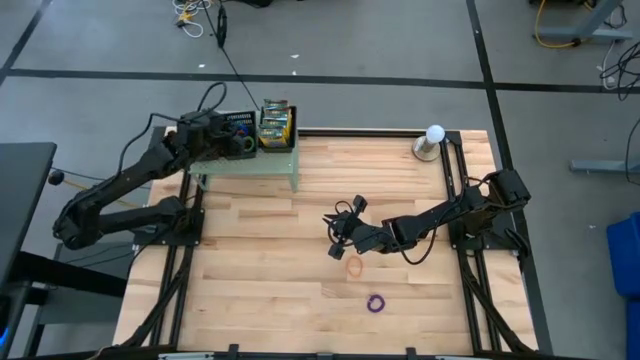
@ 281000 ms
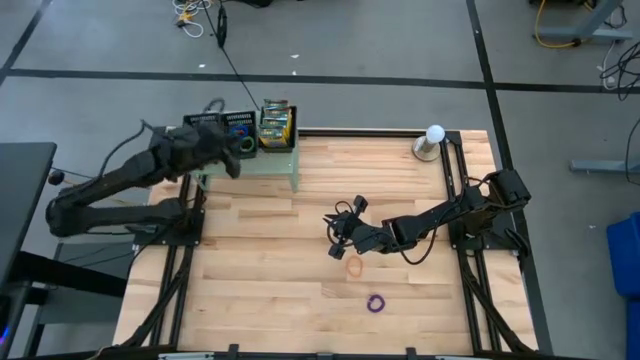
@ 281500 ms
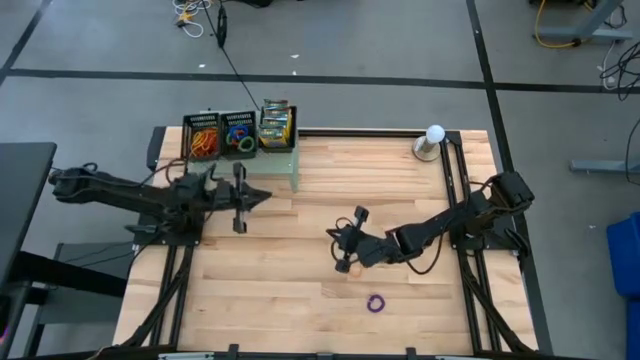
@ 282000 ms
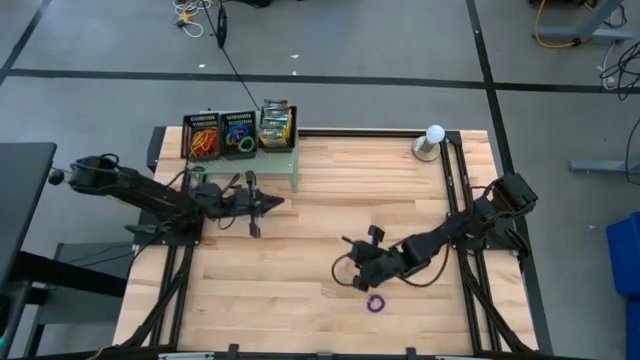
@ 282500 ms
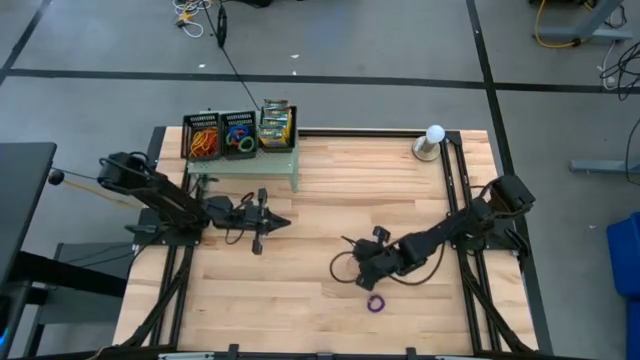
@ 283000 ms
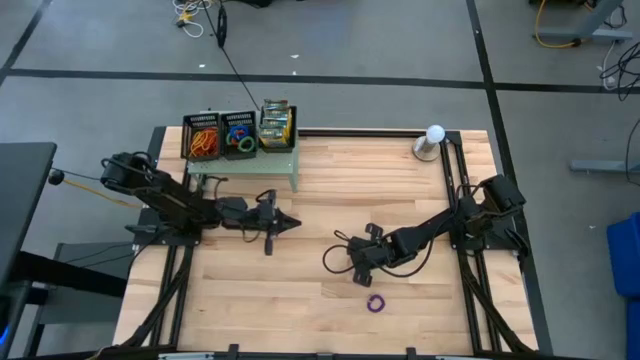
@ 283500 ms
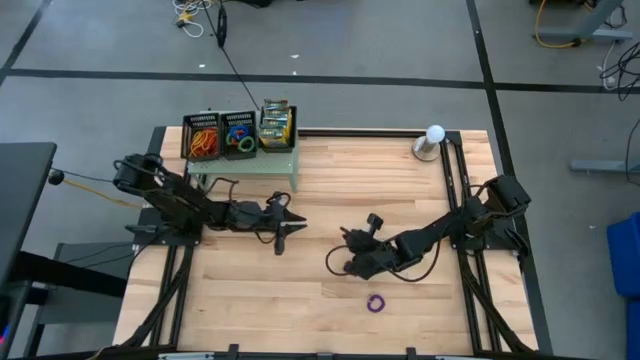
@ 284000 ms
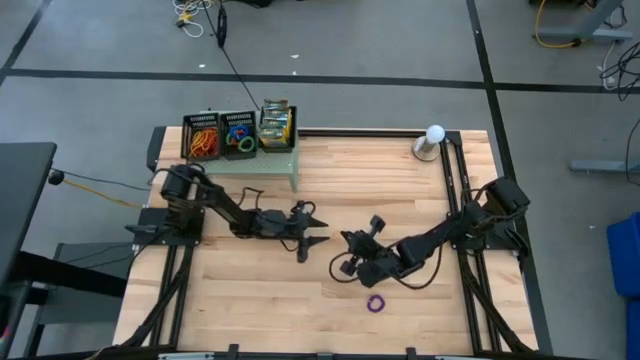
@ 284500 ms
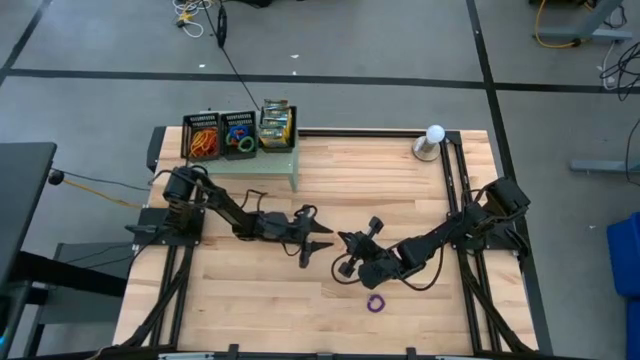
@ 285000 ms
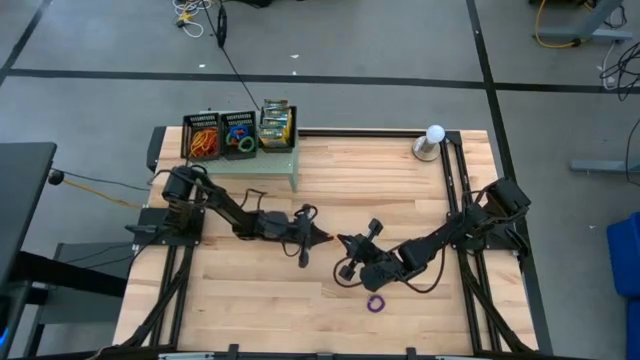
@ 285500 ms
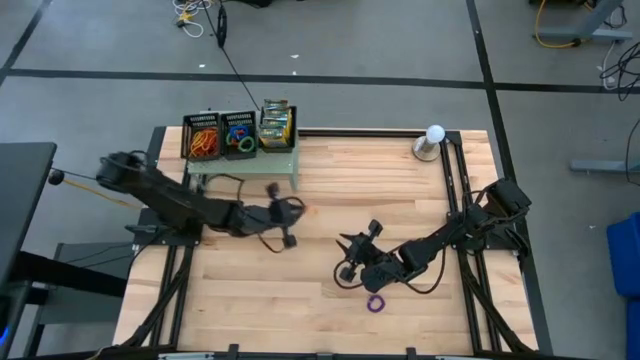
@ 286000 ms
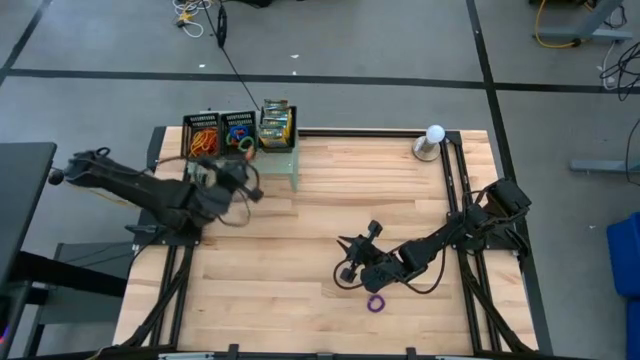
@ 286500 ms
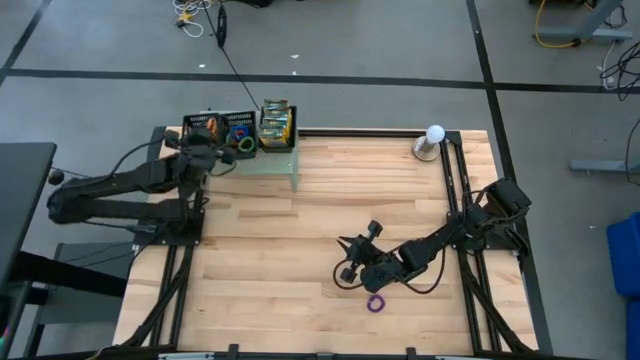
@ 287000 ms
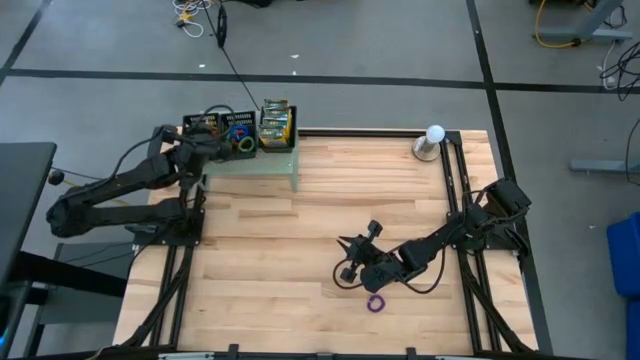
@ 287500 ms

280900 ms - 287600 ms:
Task: Pick & Place Office Desk Supplies
Put the orange rubber band into the left black bin on the shelf

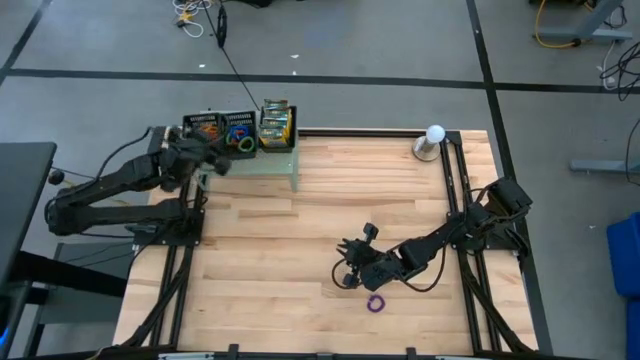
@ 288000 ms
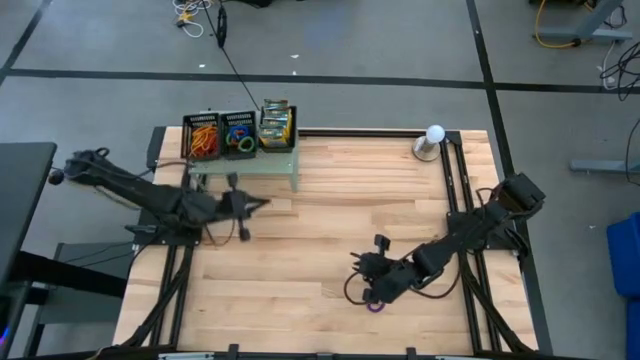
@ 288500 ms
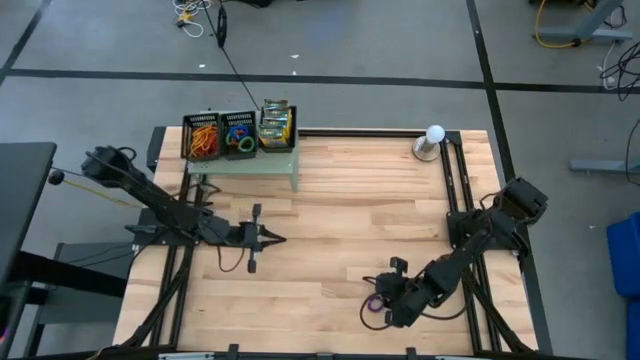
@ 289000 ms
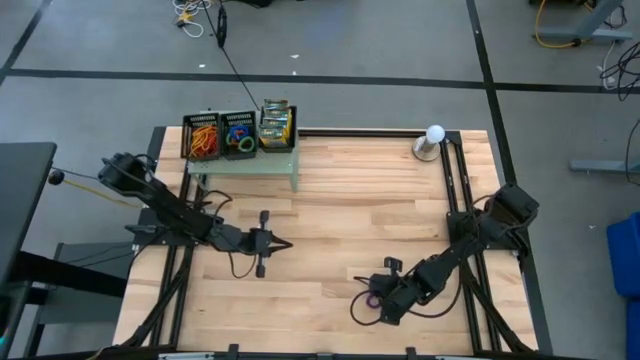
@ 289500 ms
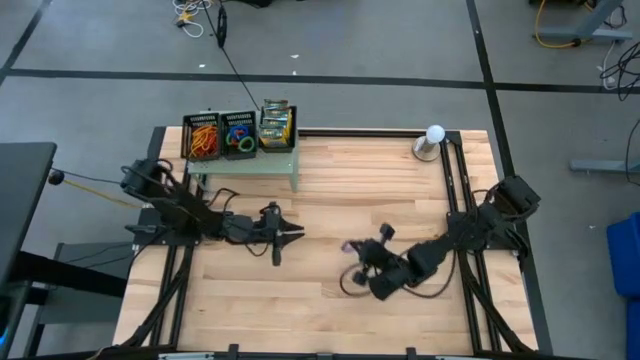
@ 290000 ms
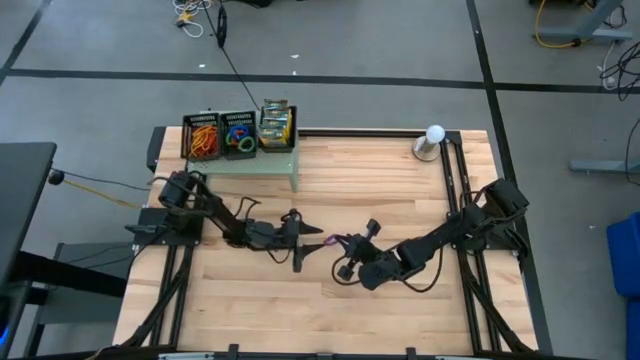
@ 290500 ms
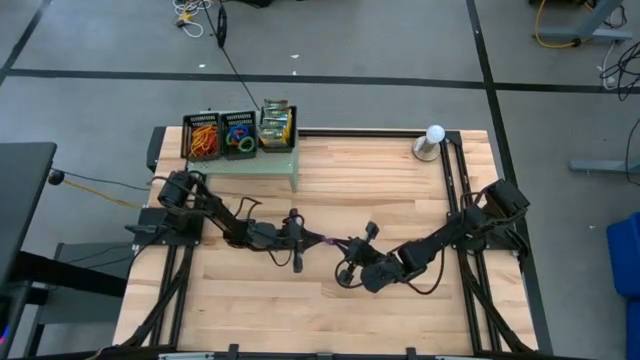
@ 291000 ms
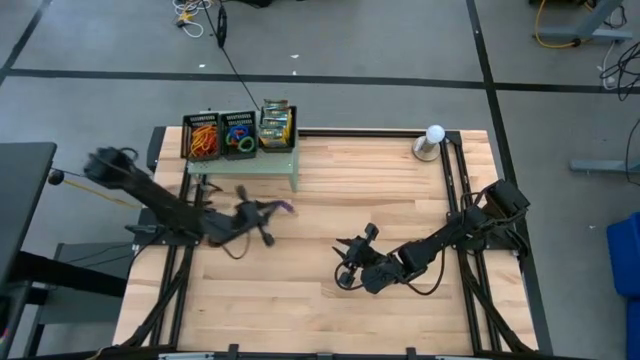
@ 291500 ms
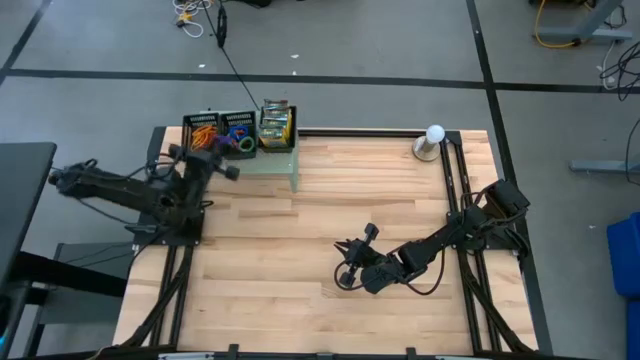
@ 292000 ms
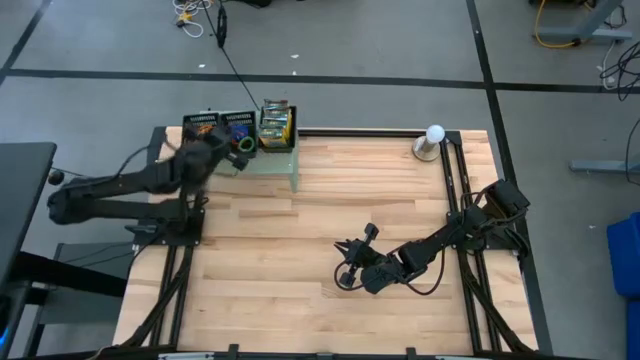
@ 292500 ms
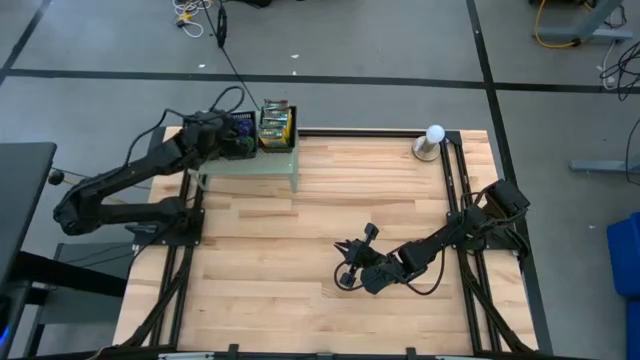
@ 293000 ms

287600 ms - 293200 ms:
Put the violet spring keychain into the middle black bin on the shelf

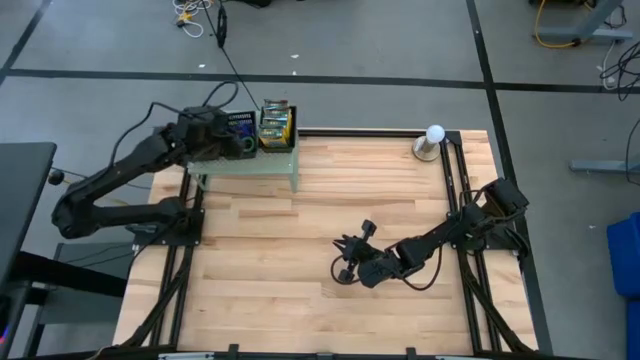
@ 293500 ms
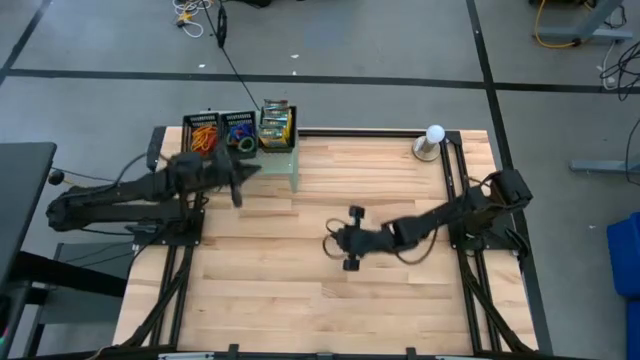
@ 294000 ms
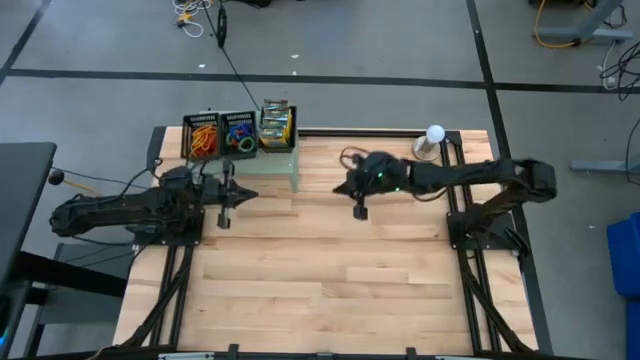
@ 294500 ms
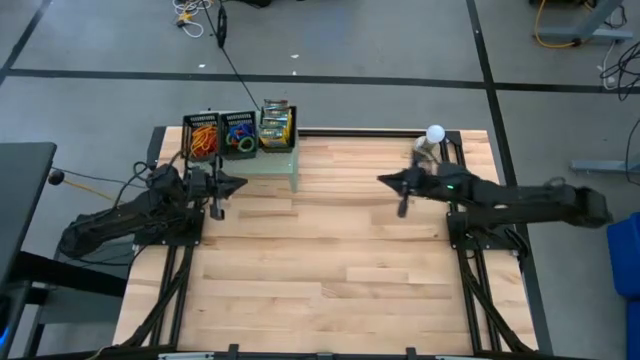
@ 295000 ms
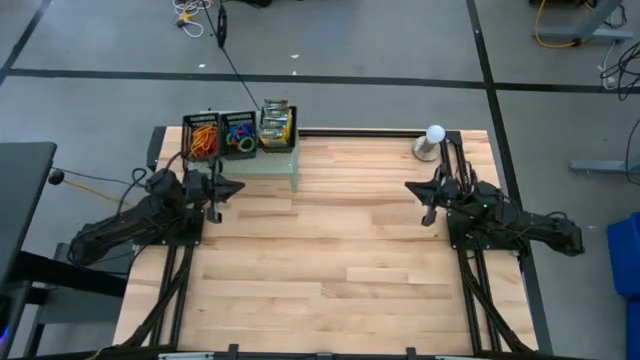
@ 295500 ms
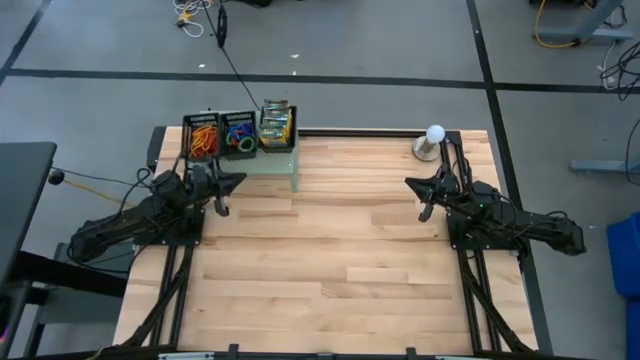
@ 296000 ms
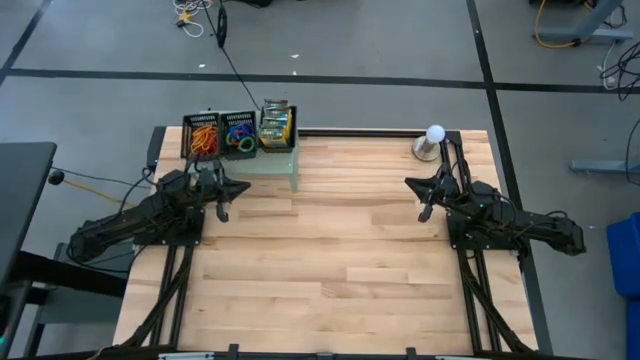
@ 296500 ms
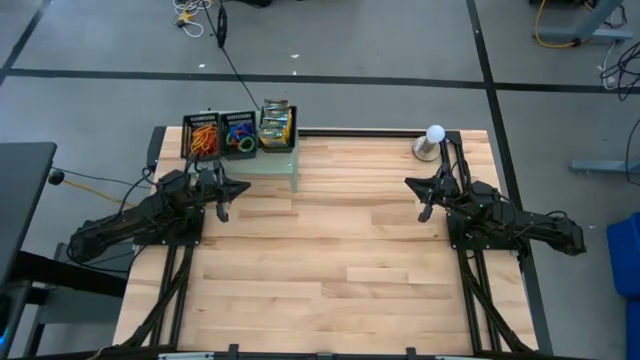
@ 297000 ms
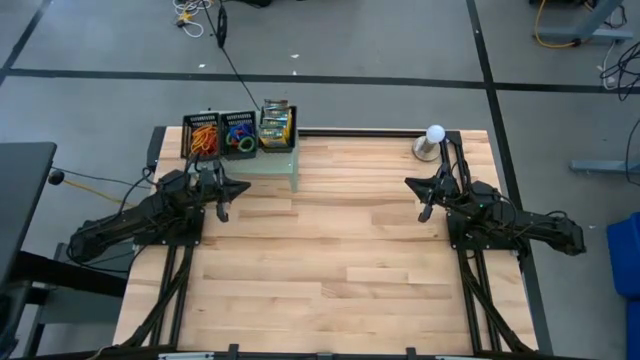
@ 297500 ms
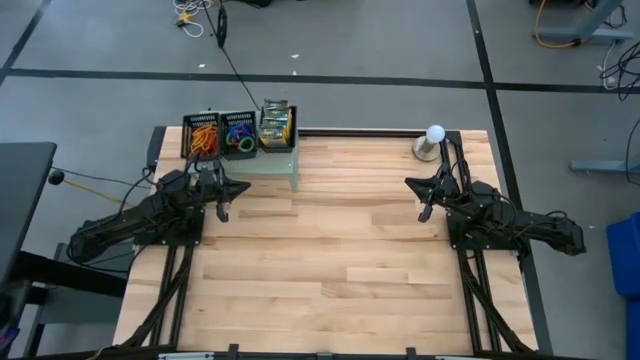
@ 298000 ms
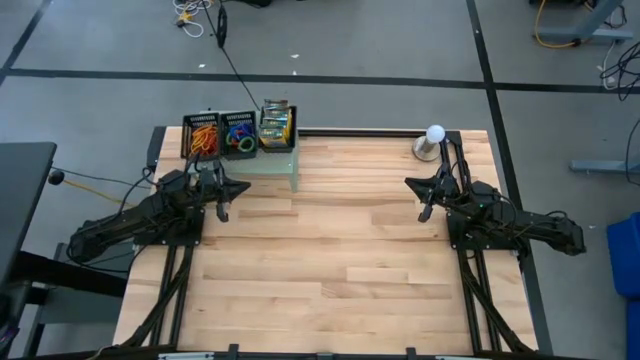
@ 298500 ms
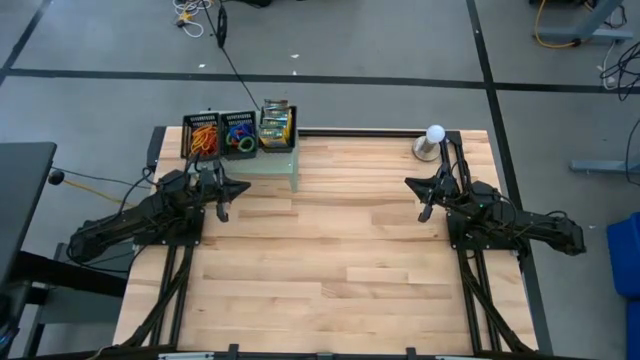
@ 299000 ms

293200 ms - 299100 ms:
Return to Home Position

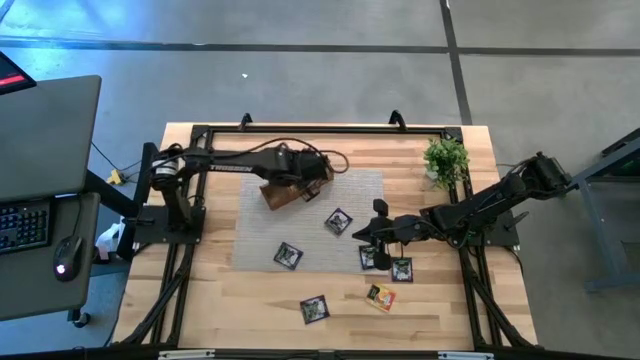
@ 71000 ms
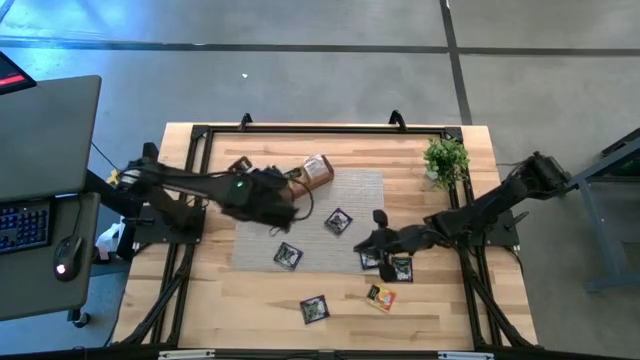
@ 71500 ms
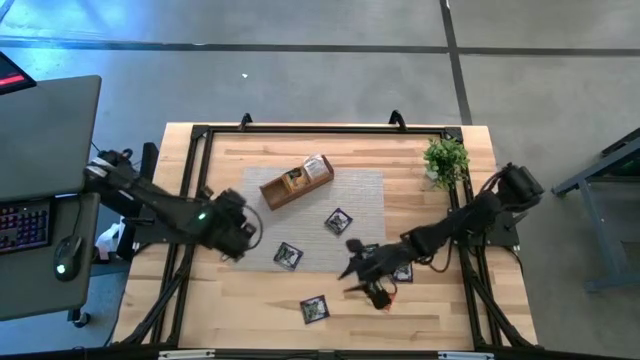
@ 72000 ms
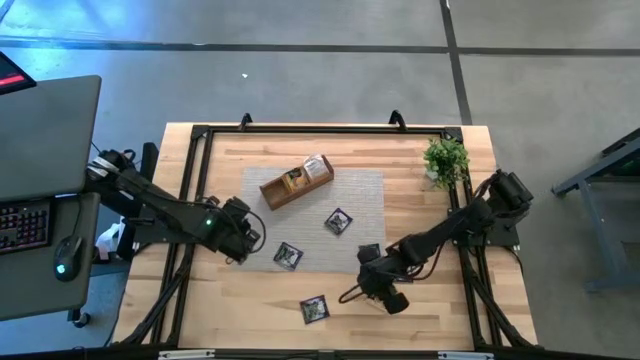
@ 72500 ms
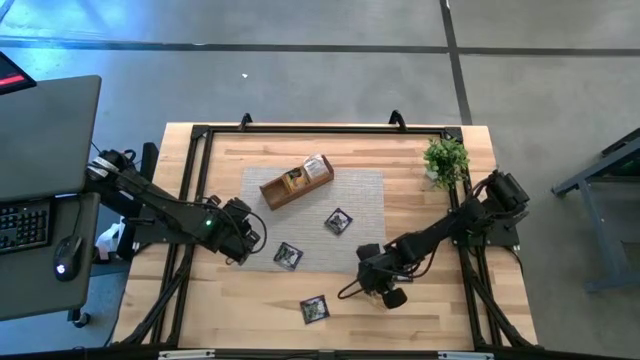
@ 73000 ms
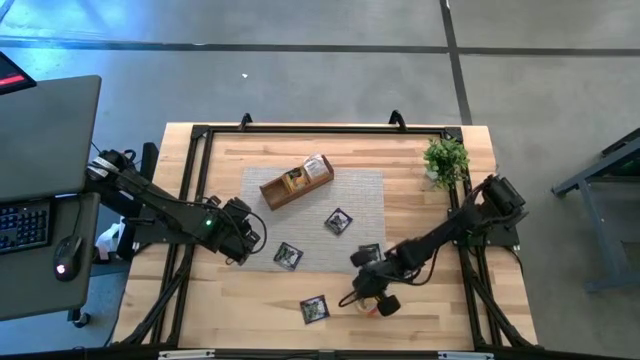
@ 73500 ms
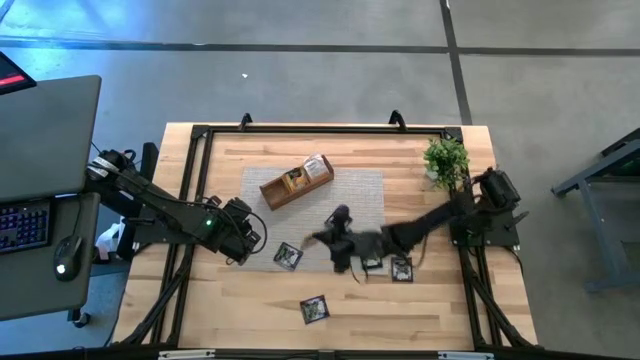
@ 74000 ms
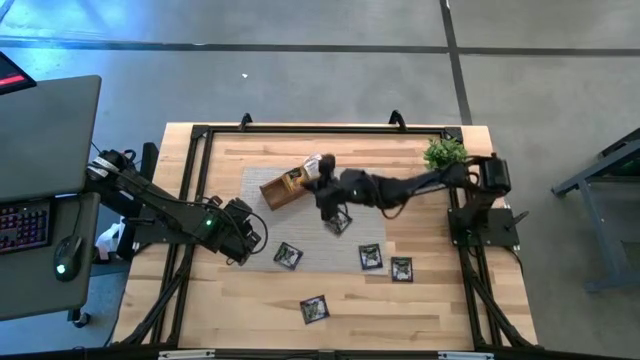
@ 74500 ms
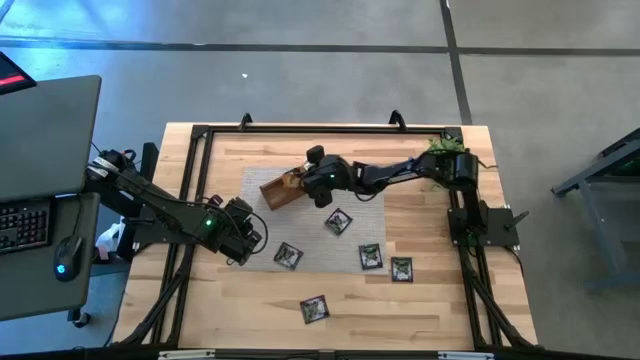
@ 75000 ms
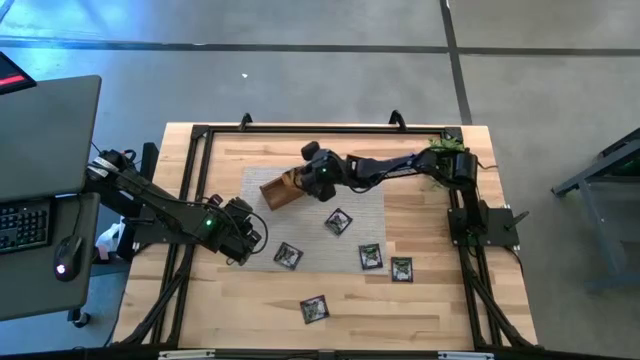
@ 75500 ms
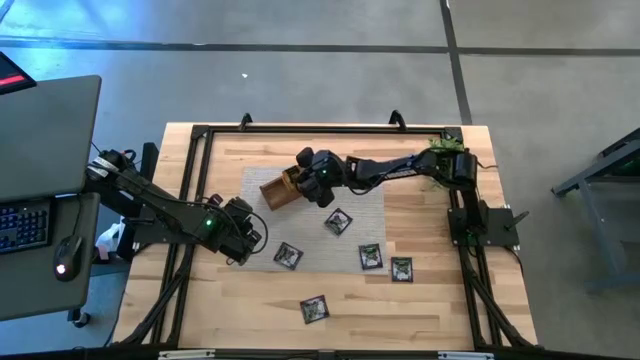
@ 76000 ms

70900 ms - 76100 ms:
Task: Pick & Place Tea
Put the yellow tea bag into the middle section of the wooden organizer
